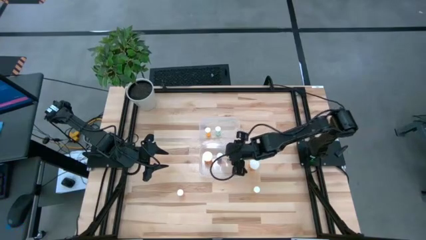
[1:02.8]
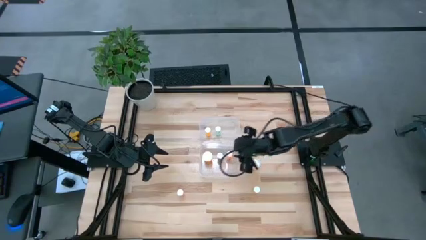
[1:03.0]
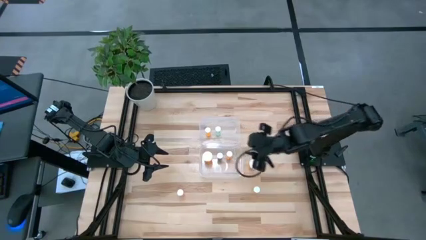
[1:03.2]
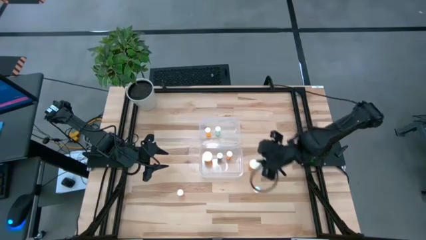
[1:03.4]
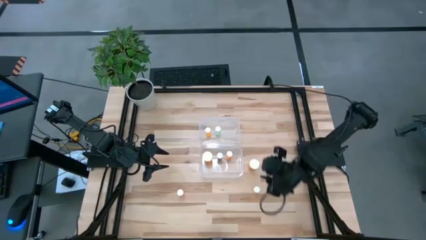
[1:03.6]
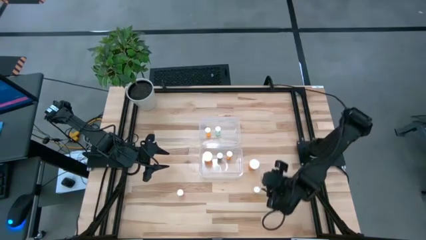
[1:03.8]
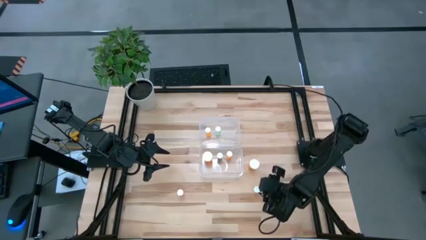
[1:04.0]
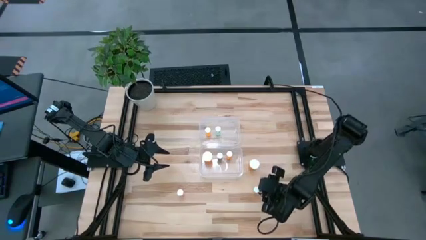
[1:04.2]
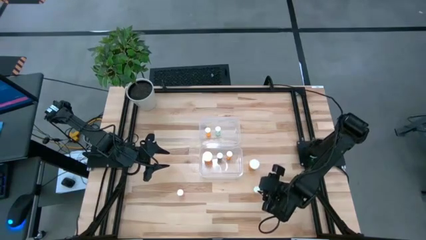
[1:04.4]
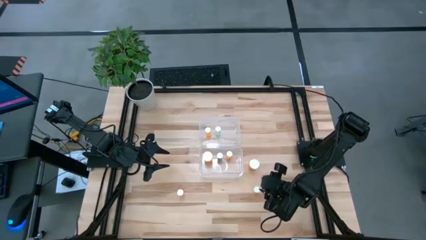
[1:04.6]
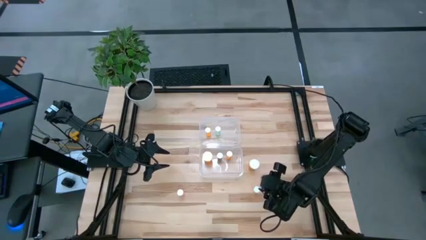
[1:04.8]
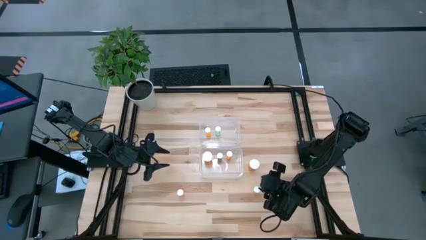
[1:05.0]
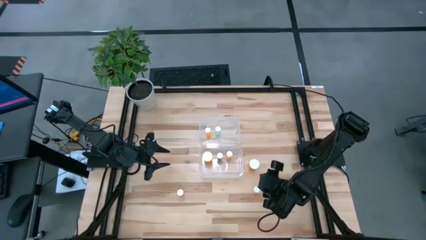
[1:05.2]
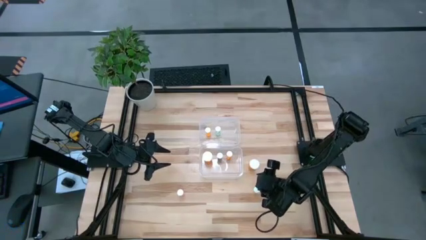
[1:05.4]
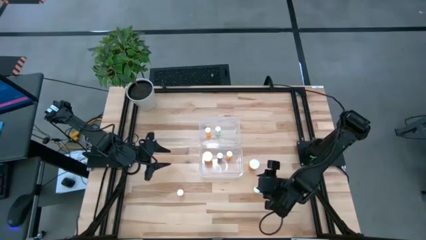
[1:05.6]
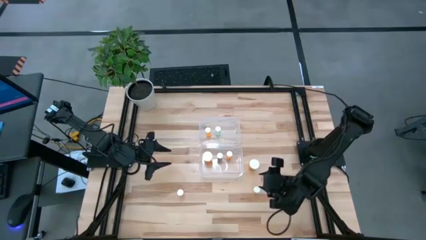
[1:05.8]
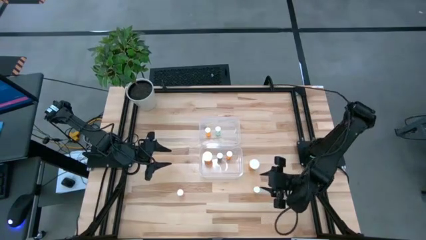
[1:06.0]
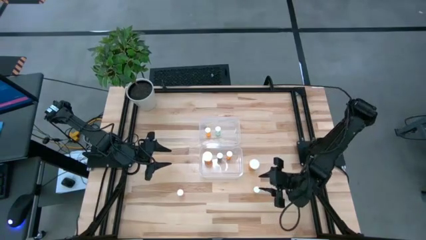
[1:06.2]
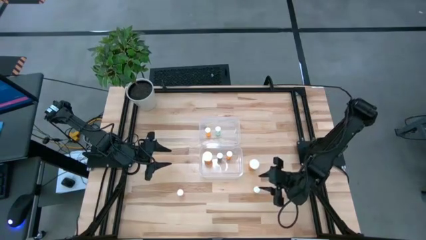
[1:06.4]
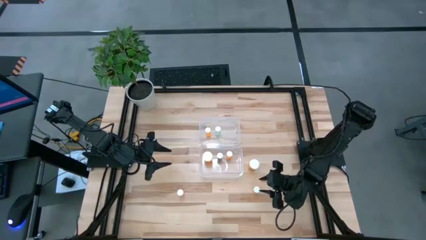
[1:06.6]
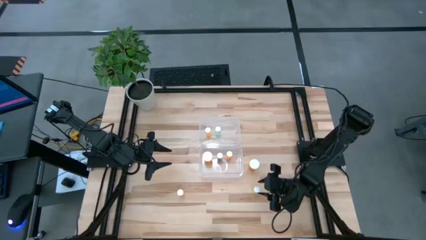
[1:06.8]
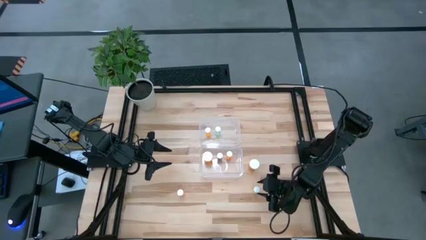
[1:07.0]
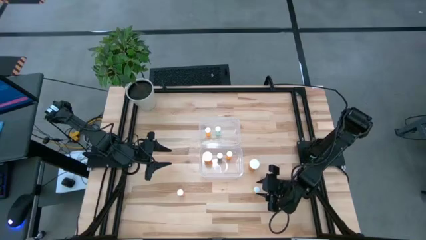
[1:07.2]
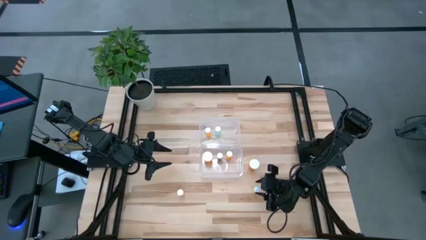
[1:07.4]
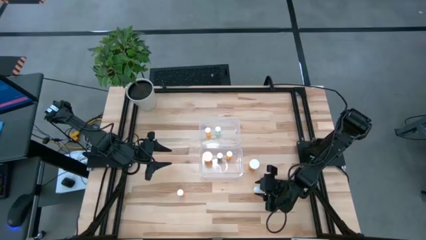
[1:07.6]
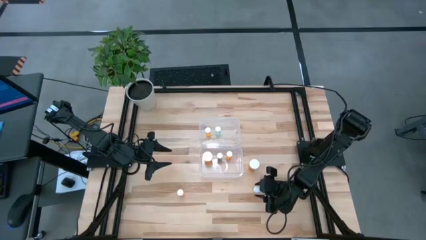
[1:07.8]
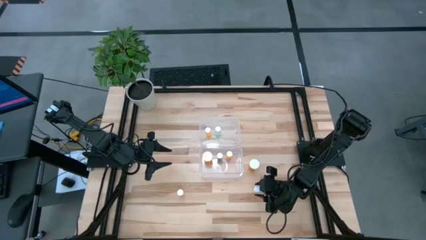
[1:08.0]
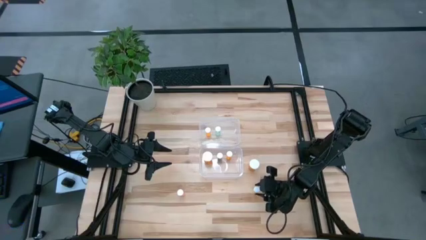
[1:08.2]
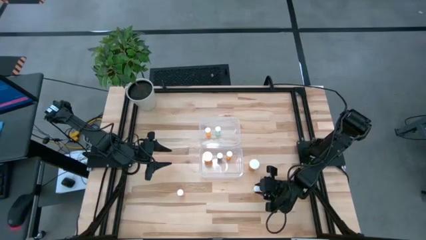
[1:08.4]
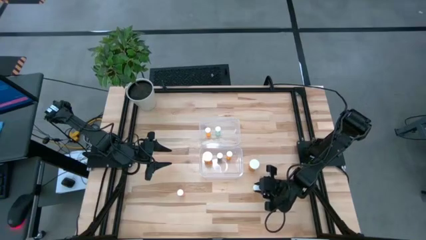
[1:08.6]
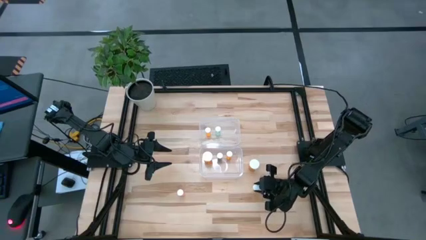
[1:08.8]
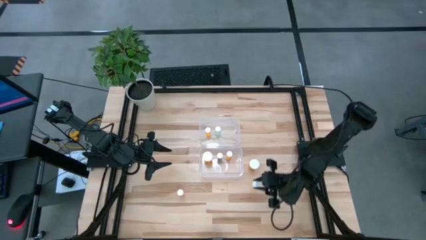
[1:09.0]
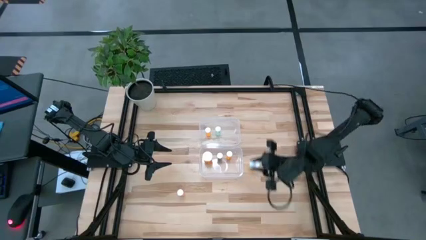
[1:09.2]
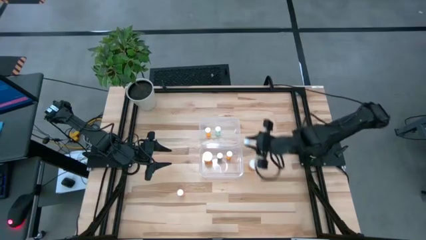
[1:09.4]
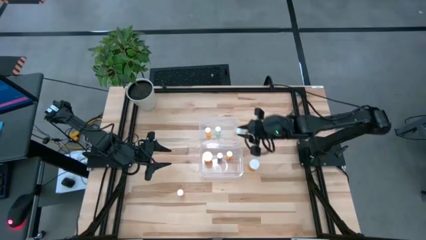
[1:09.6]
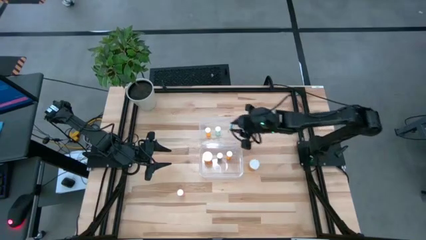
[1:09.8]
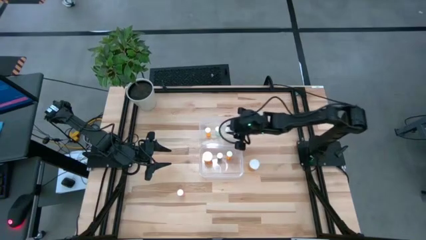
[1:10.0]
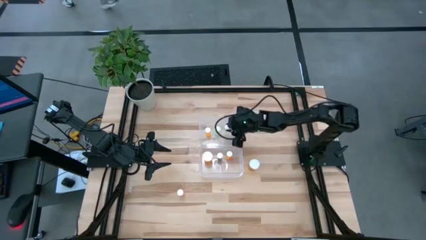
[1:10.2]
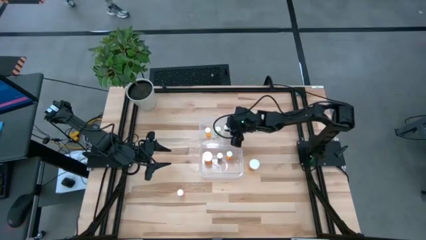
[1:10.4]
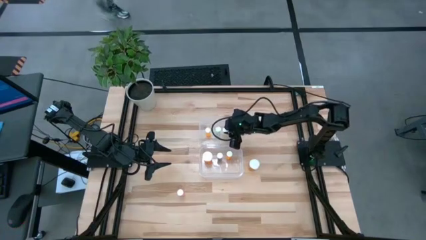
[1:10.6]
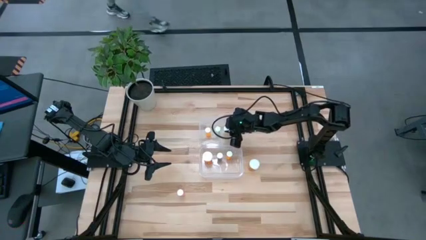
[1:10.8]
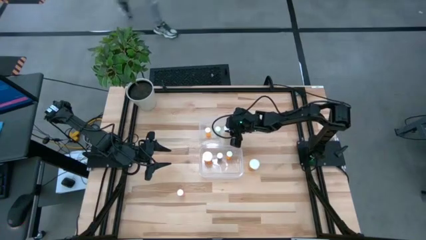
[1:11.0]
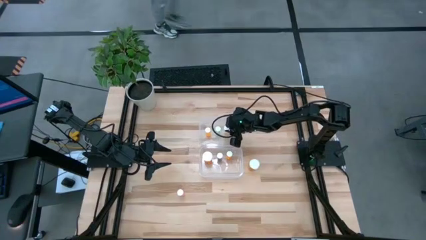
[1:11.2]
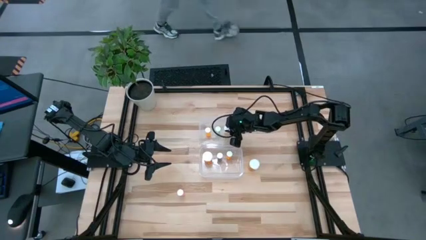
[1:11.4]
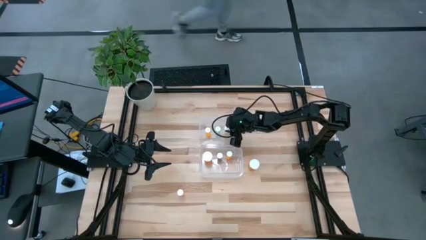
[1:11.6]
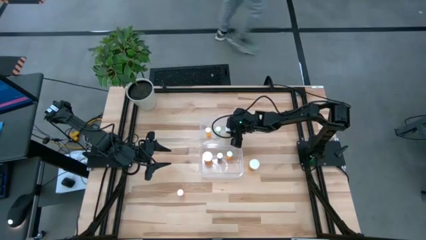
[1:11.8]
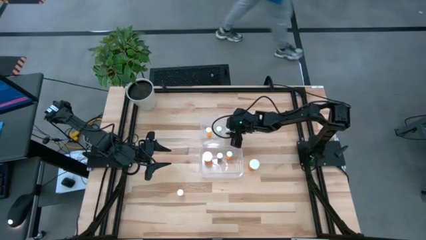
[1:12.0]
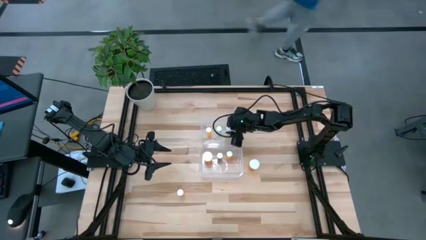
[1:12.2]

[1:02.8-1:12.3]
Task: Pick and place medicine bottles into bin by pill shape (circle, oval)
Put the yellow tablet bottle into the top transparent bin

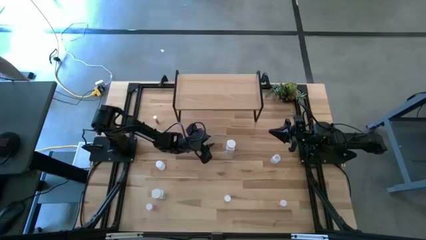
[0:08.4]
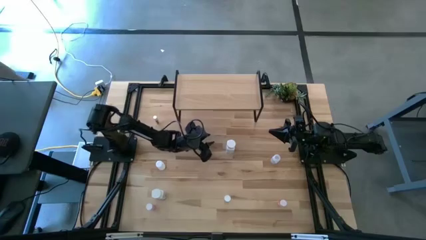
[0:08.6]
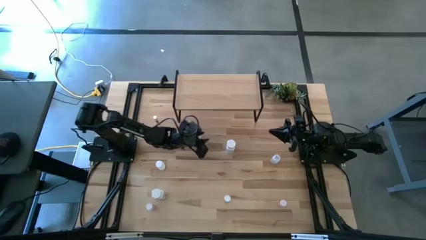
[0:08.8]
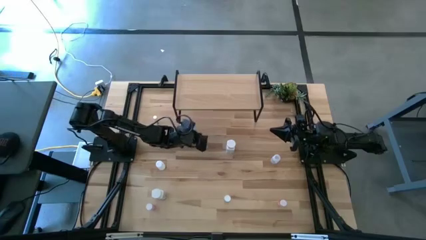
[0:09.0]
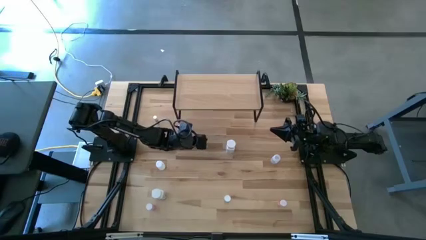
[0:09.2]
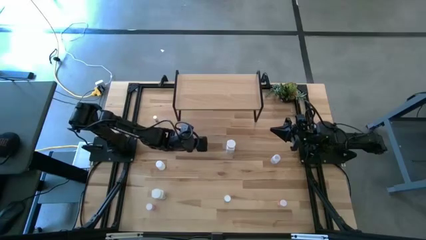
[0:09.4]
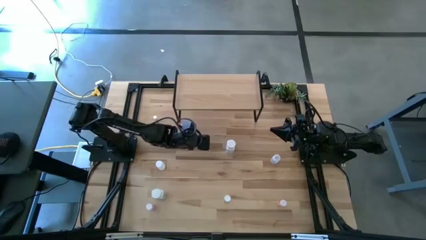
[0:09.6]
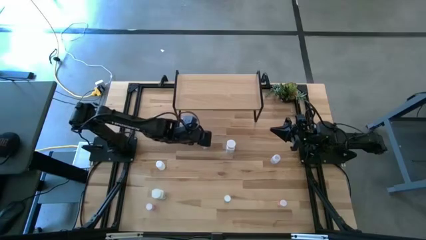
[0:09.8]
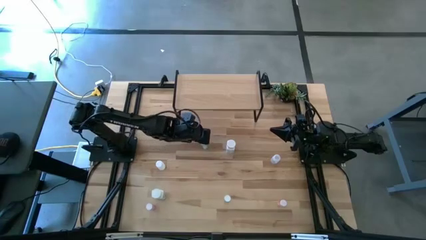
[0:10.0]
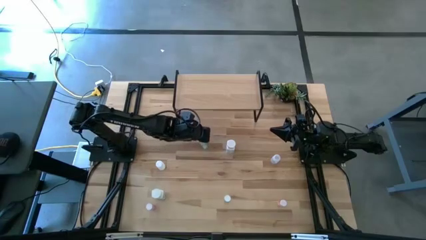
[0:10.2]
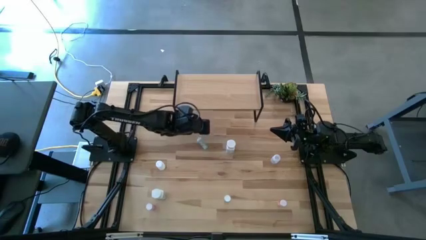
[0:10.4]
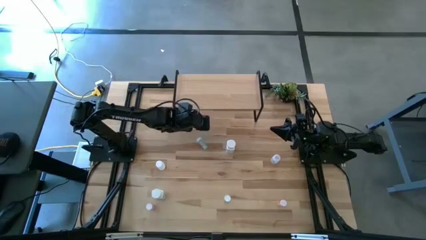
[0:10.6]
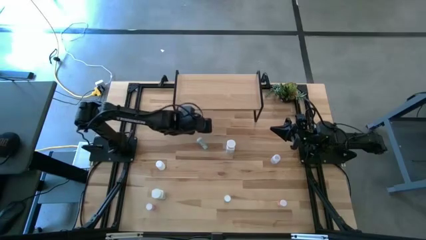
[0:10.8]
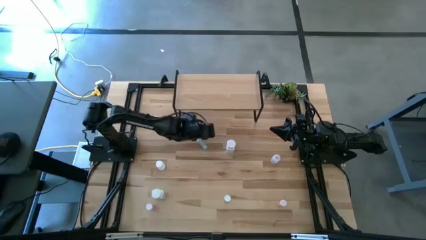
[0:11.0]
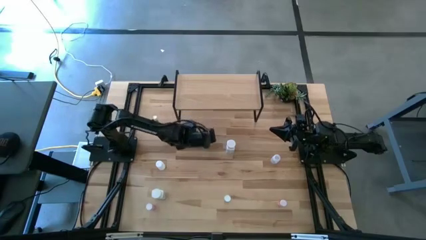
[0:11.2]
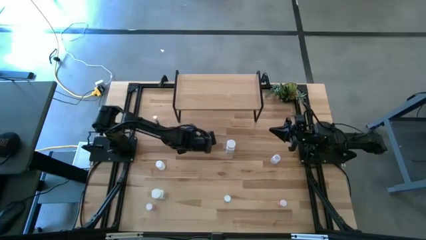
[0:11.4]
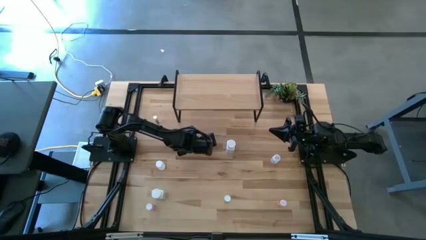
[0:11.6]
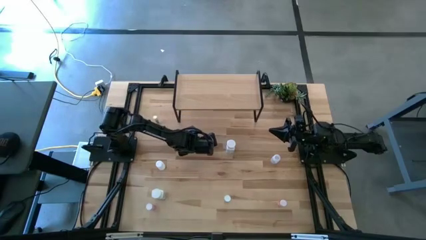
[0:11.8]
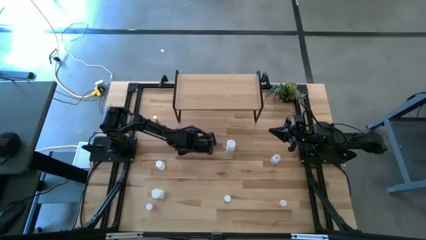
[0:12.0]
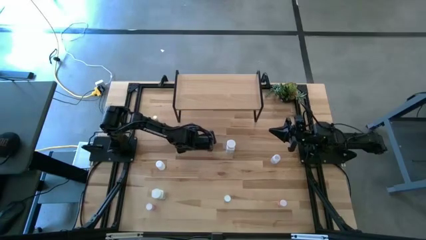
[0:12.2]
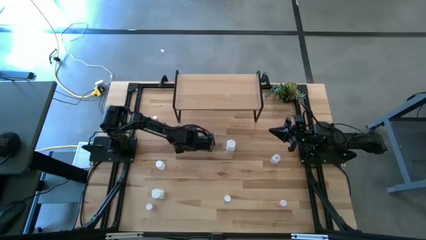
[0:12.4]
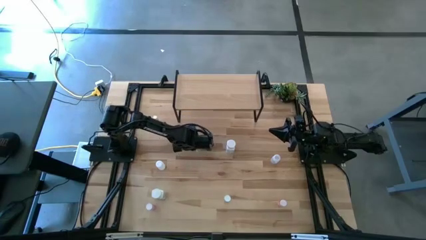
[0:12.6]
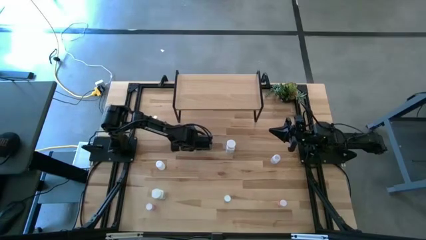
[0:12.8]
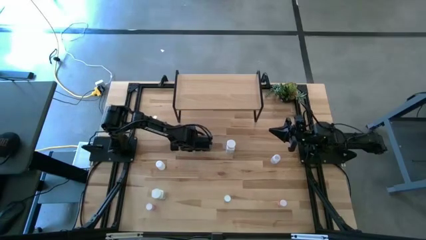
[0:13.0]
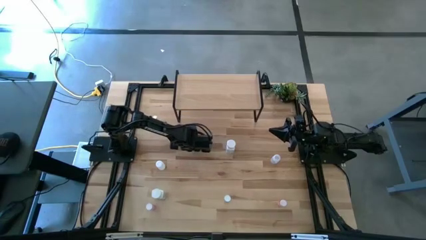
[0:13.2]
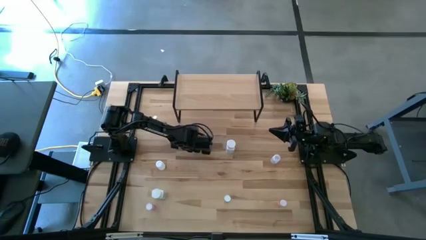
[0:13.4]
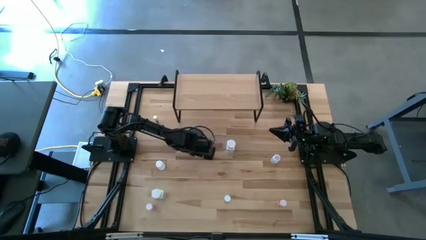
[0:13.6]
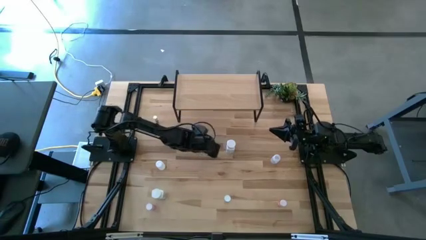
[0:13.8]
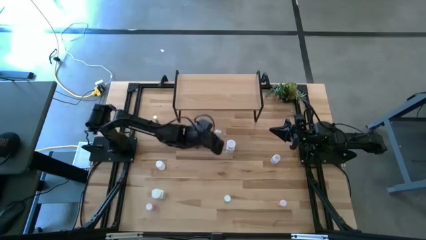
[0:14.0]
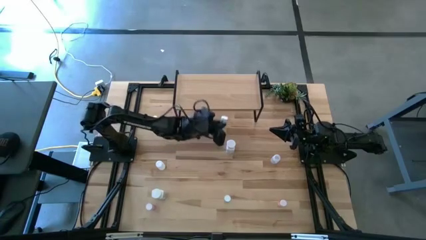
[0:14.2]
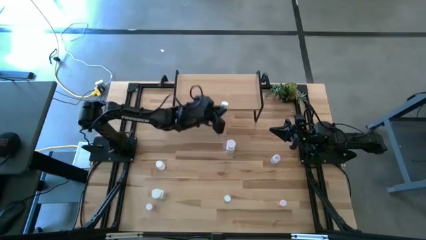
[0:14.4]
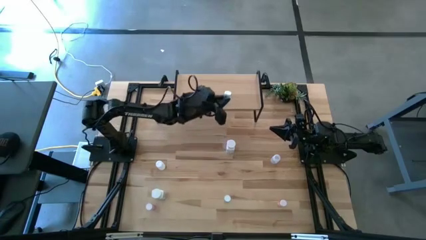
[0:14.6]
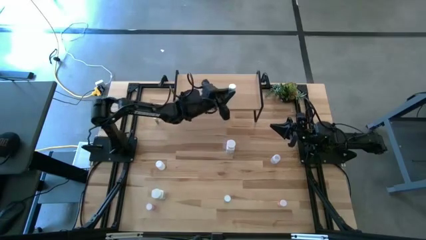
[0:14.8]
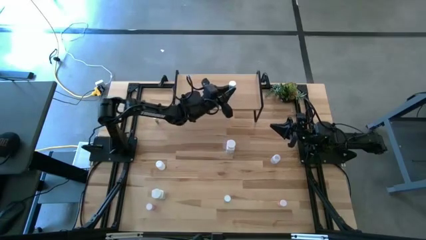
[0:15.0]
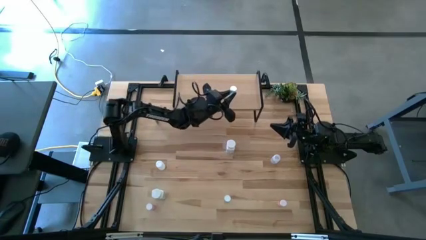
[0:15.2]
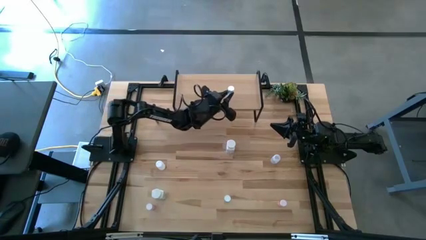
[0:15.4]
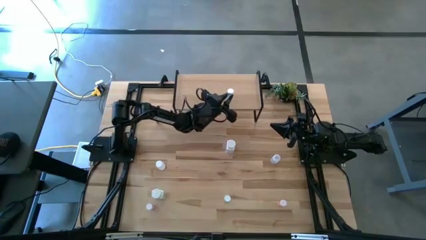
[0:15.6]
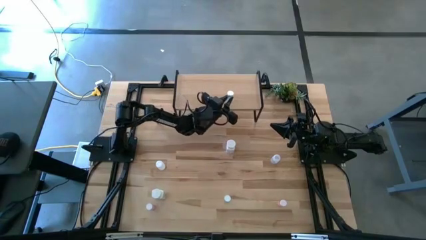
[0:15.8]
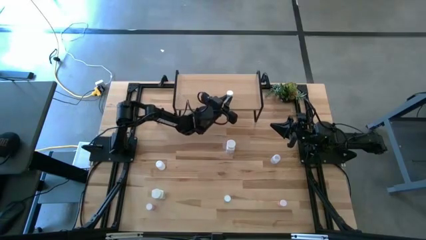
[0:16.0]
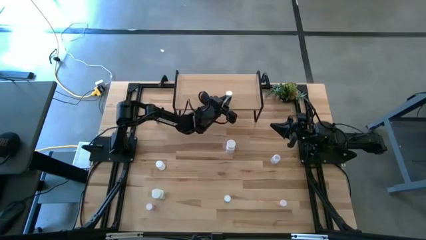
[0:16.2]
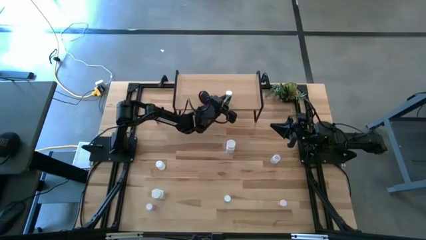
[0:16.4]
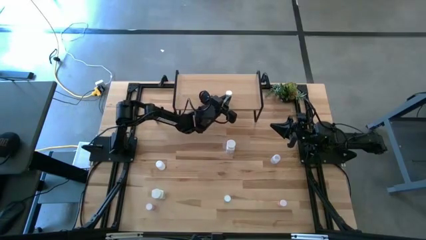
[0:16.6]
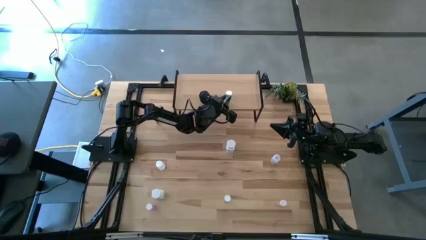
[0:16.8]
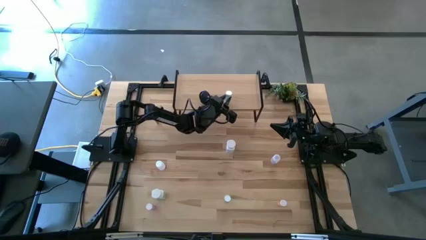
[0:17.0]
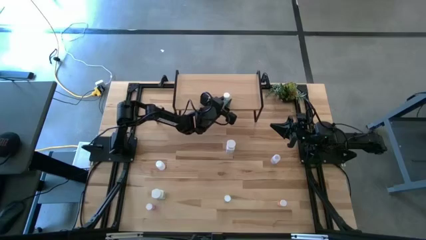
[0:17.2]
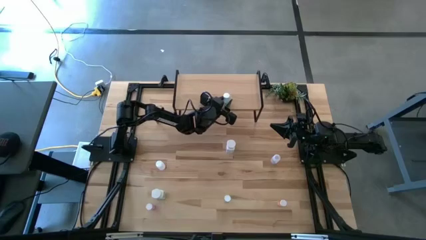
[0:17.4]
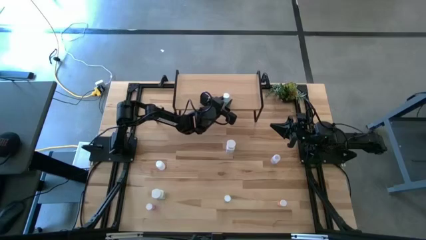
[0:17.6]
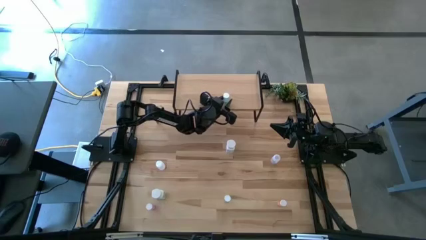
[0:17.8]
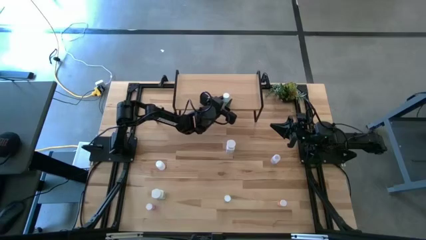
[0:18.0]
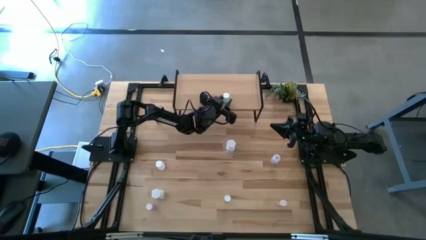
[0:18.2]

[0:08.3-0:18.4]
Task: Pick and place medicine bottles onto shelf by color
Put the top blue pill bottle on the shelf
